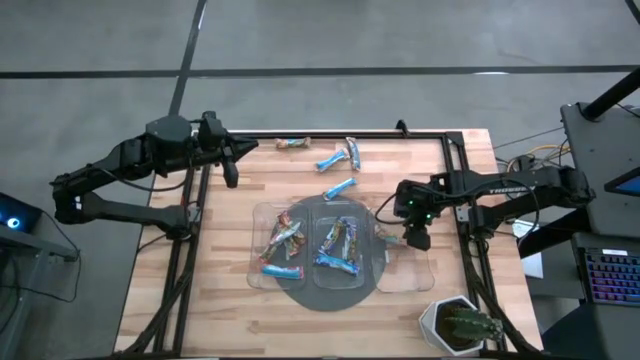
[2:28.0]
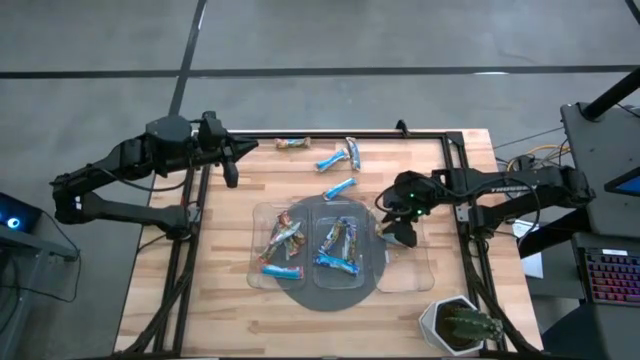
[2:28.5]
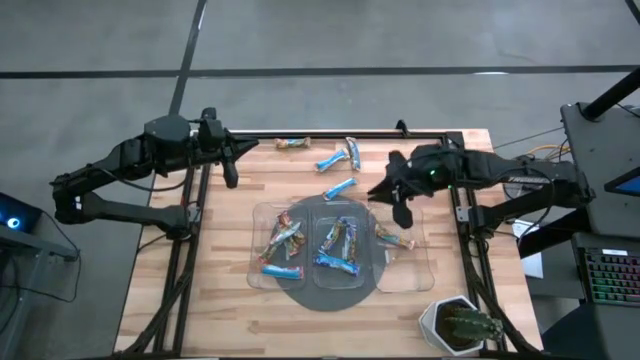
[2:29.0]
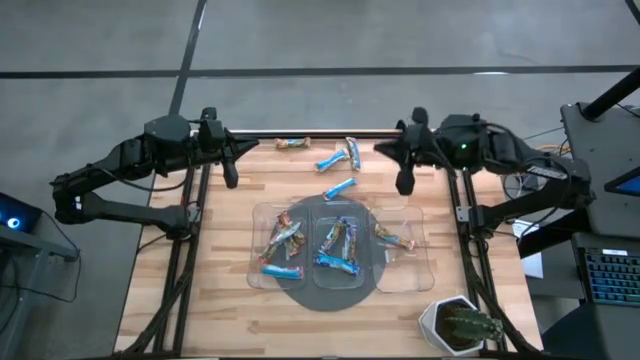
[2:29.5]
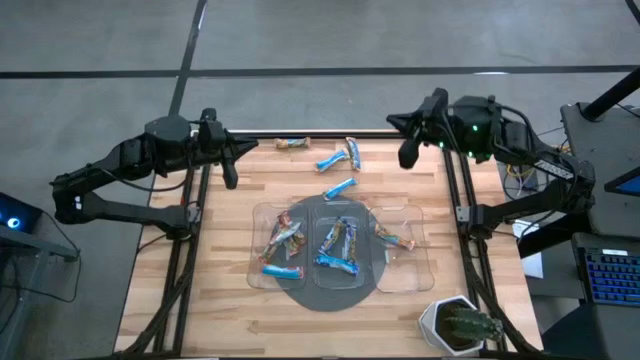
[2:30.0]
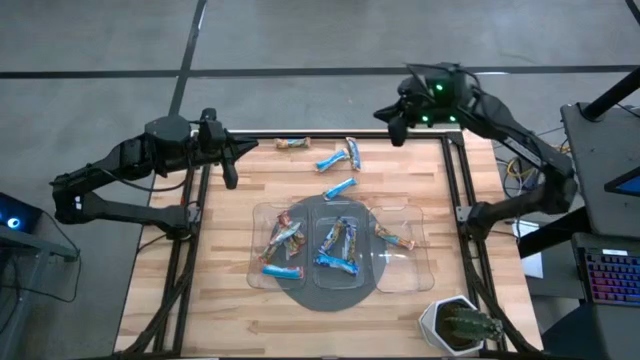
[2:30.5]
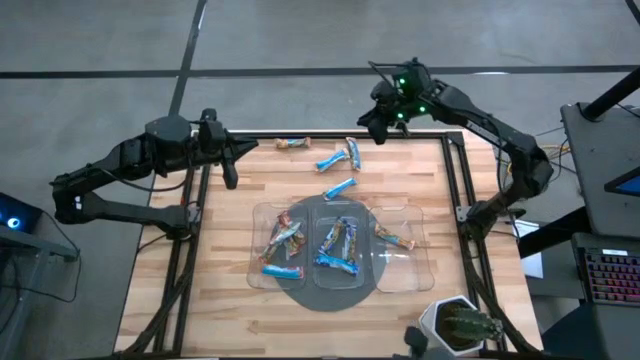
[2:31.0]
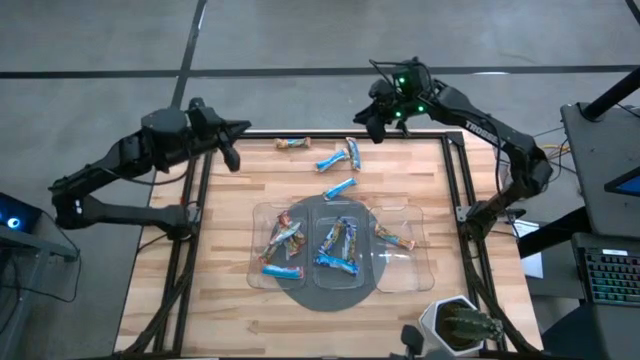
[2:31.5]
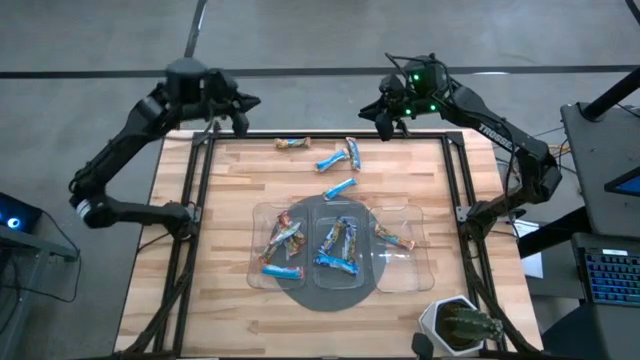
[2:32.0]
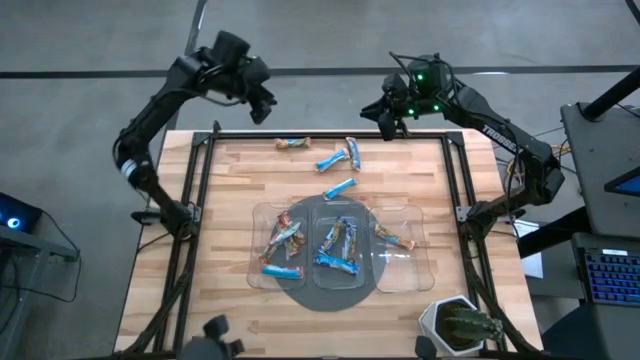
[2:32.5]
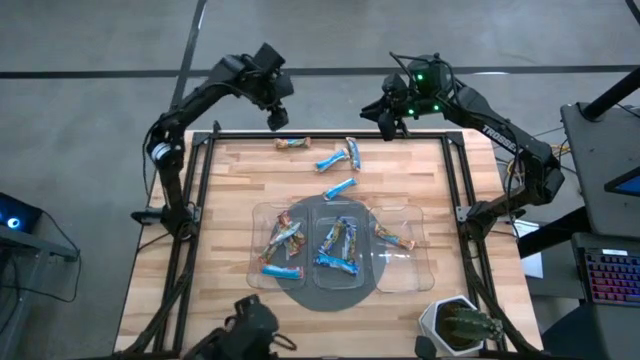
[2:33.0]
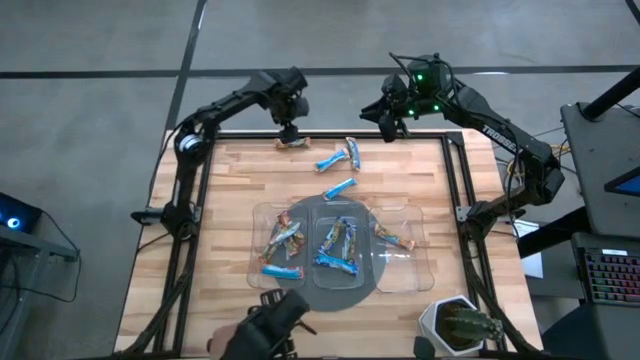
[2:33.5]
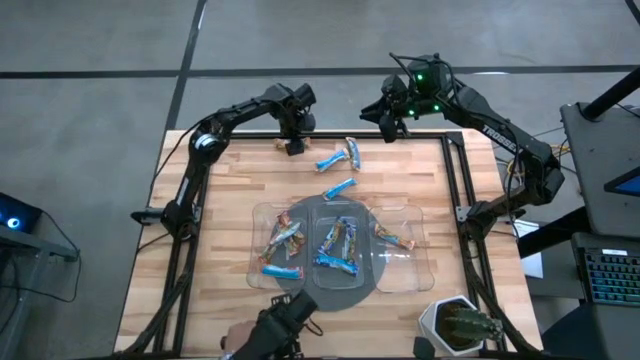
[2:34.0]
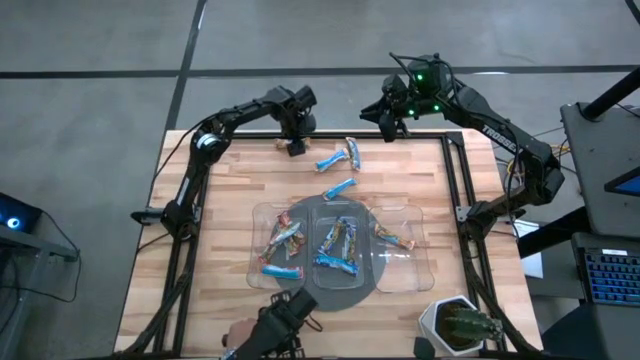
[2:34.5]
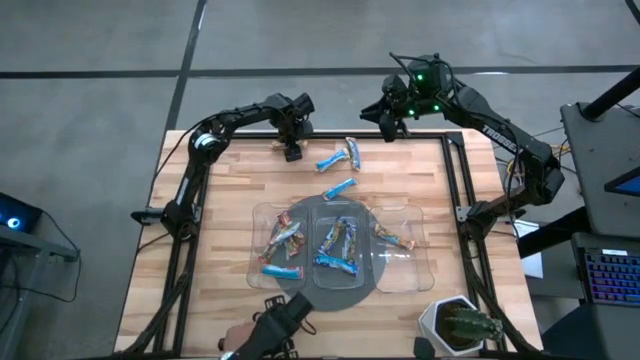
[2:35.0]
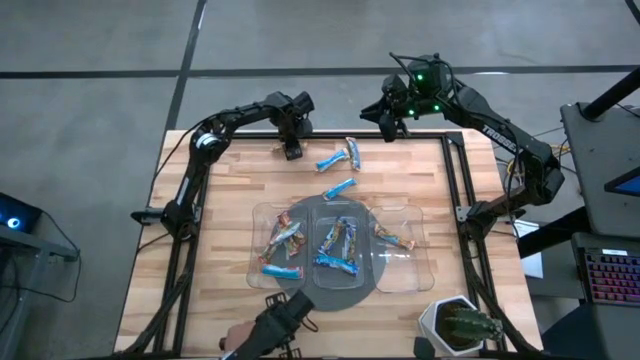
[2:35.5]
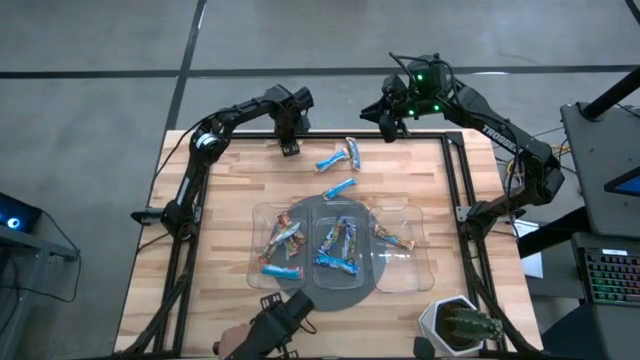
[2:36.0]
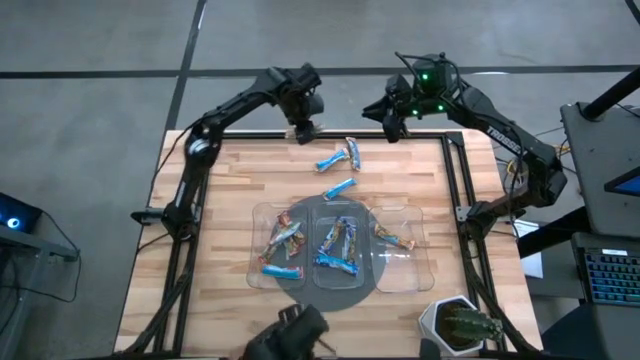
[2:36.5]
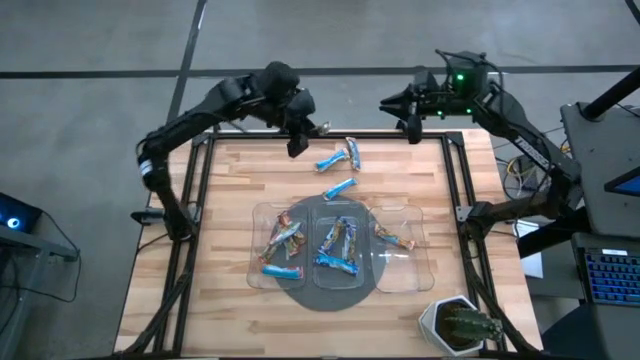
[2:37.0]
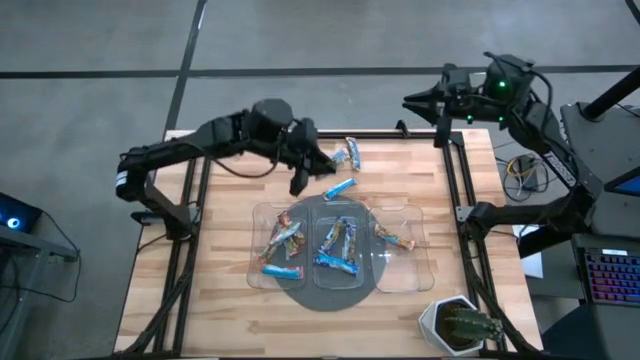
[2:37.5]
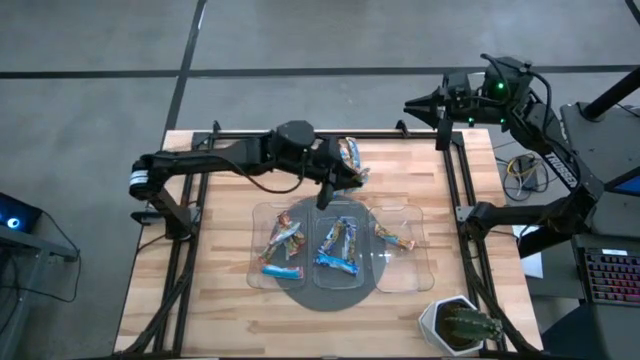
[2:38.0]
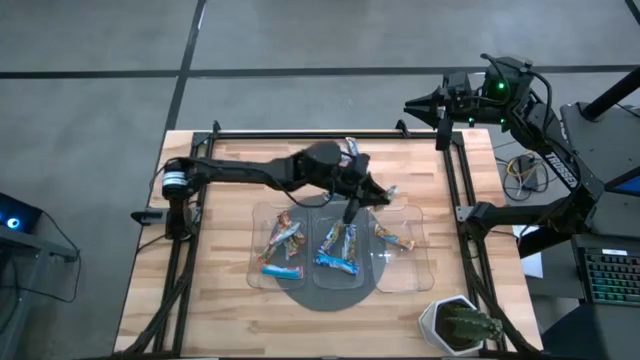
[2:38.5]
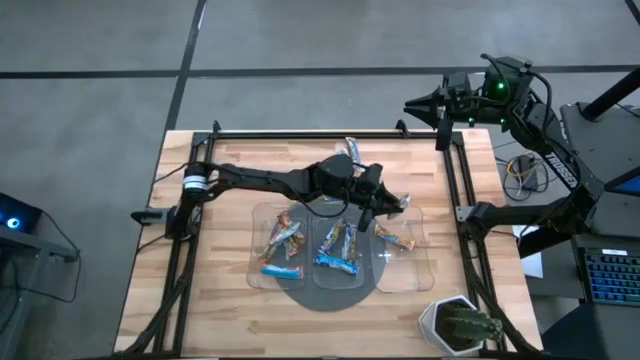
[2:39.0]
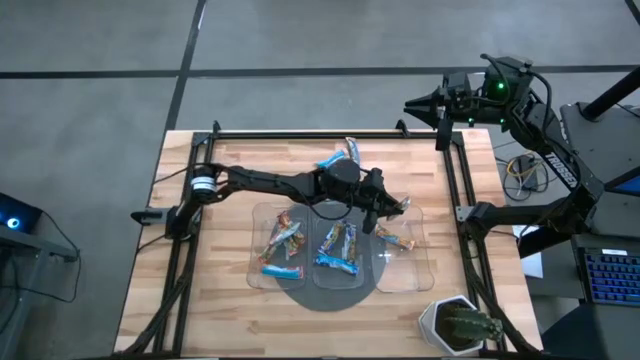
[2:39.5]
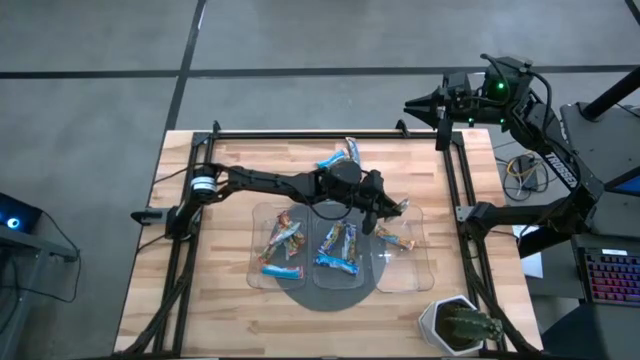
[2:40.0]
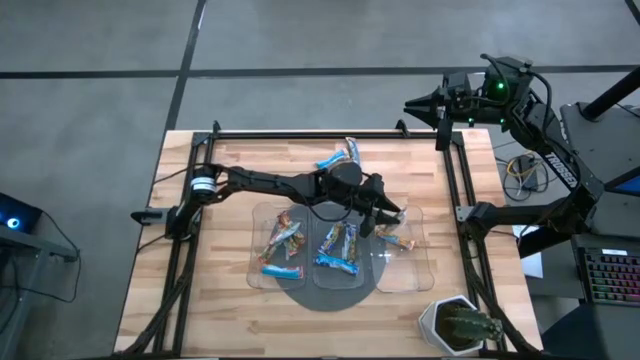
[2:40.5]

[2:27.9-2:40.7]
Task: Pick and place Granola Bars by type
Put the yellow granola bar into the right transparent bin

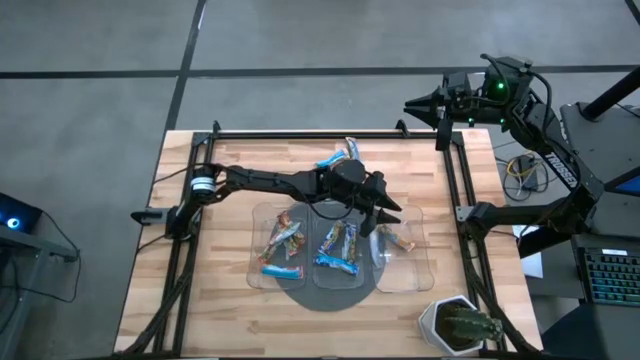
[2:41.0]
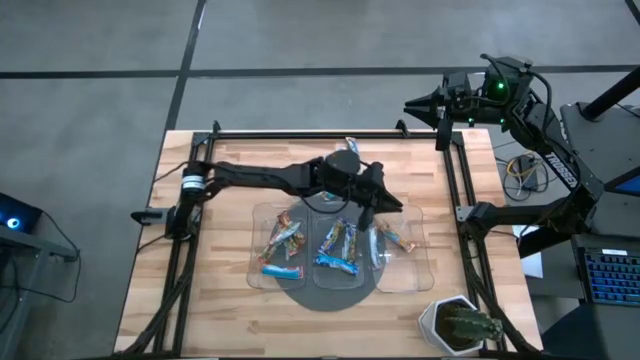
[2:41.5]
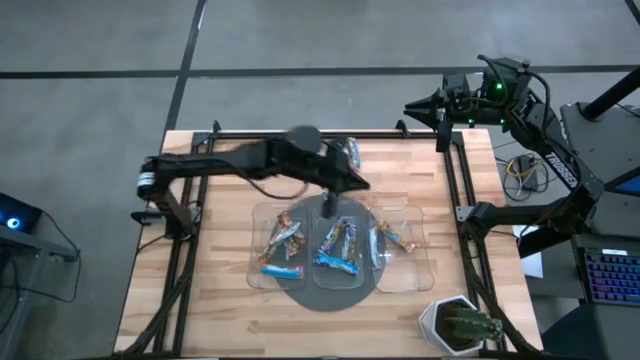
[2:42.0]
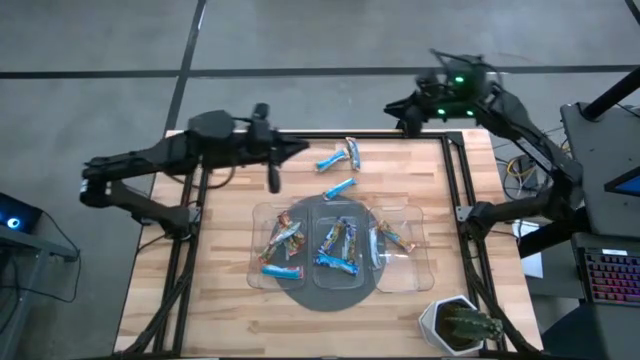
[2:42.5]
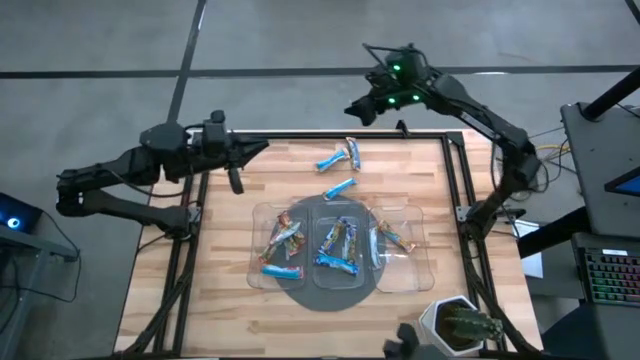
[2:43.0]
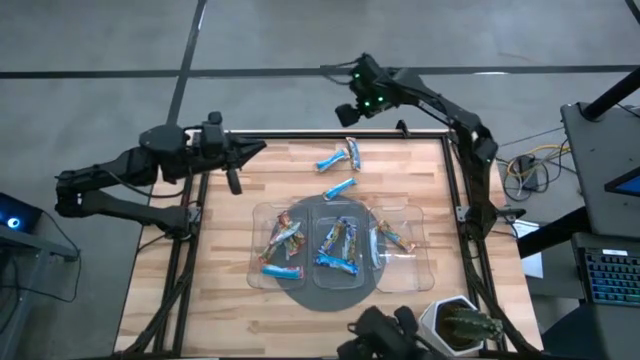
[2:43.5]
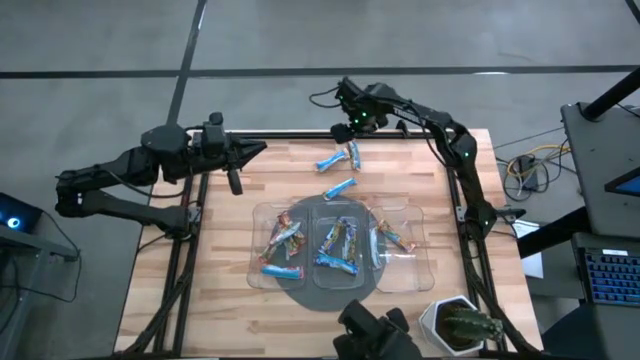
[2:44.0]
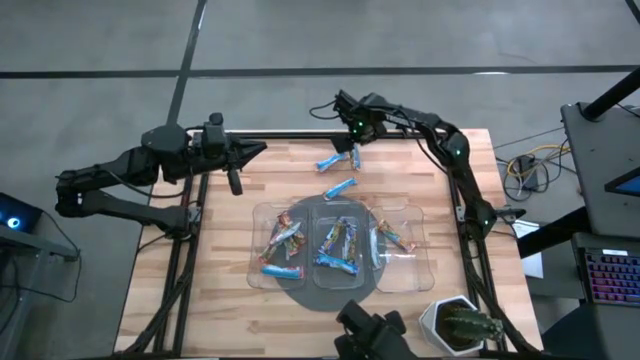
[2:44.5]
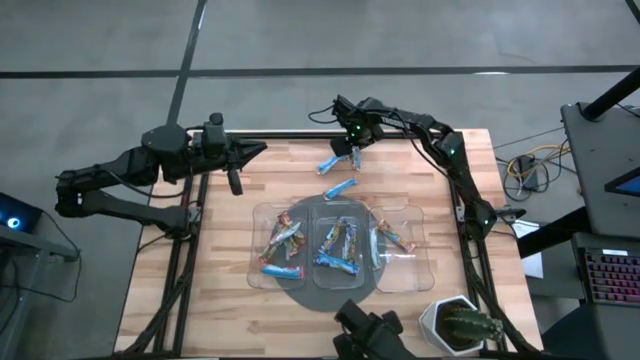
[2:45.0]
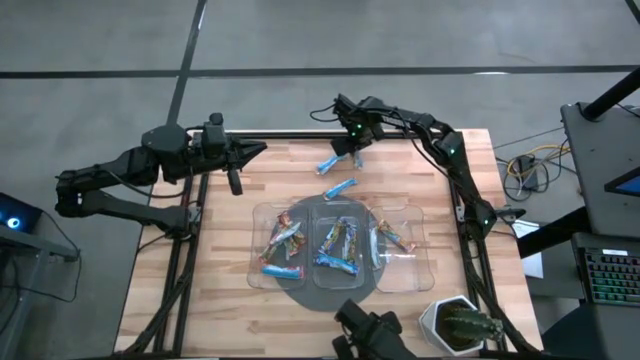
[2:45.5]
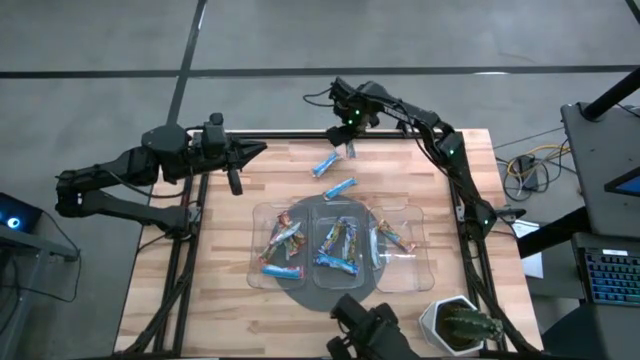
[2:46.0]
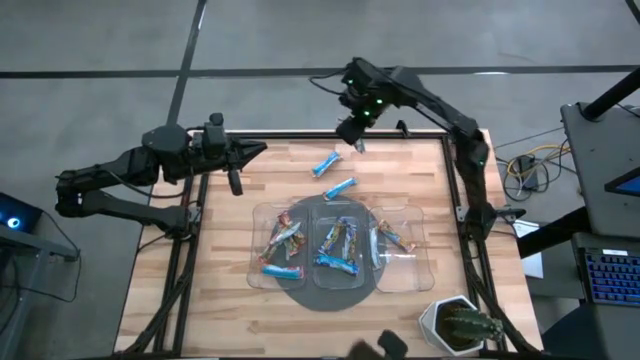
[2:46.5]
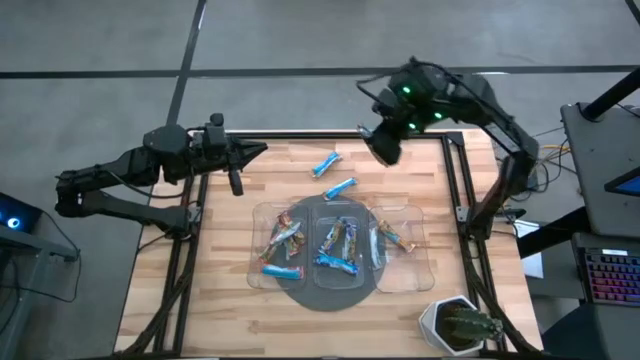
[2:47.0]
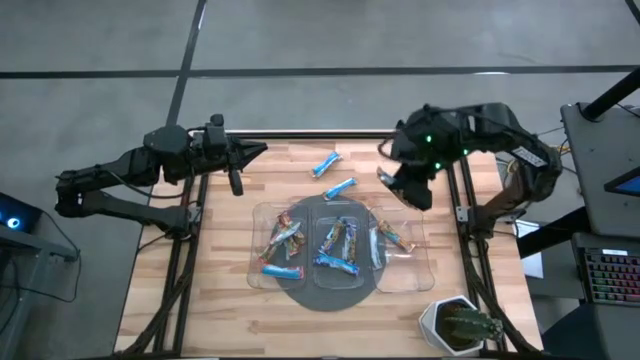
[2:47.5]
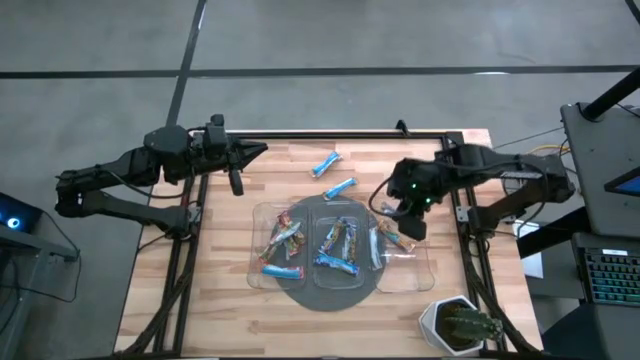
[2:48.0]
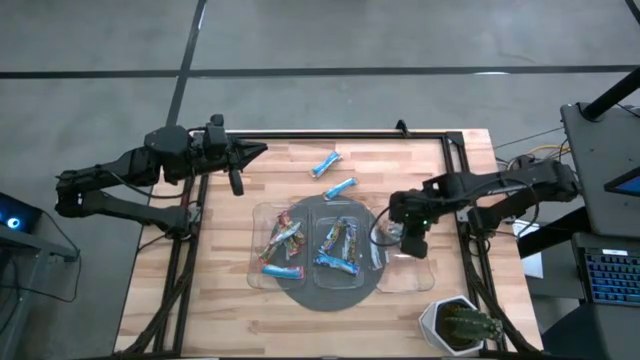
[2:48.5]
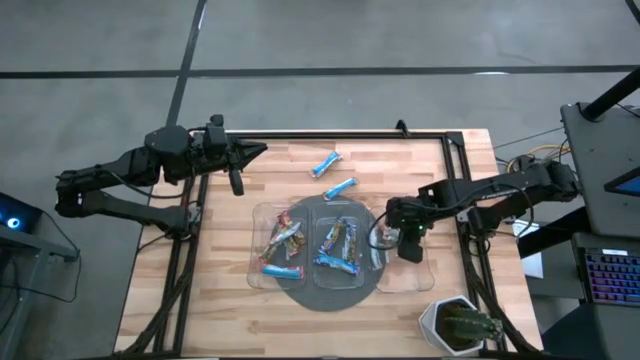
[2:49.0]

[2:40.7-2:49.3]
Put the yellow granola bar into the right transparent bin
